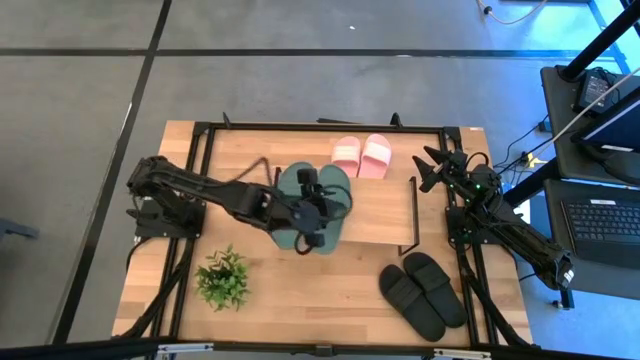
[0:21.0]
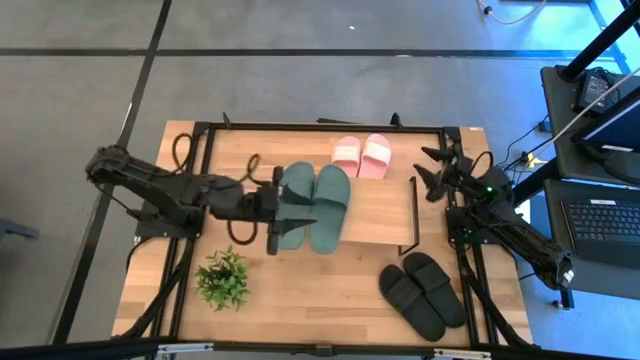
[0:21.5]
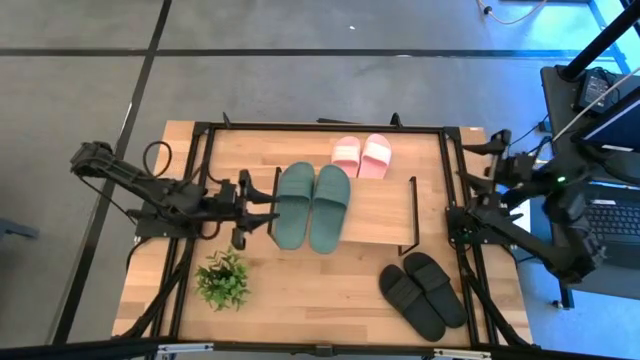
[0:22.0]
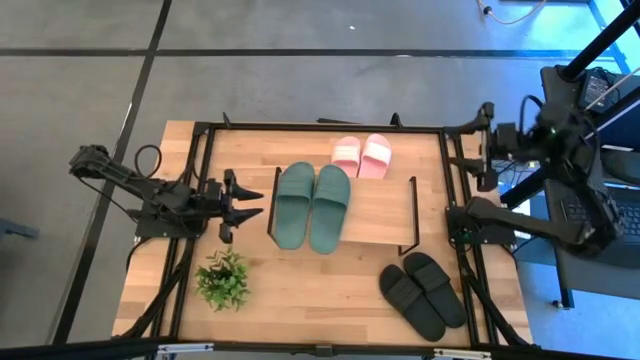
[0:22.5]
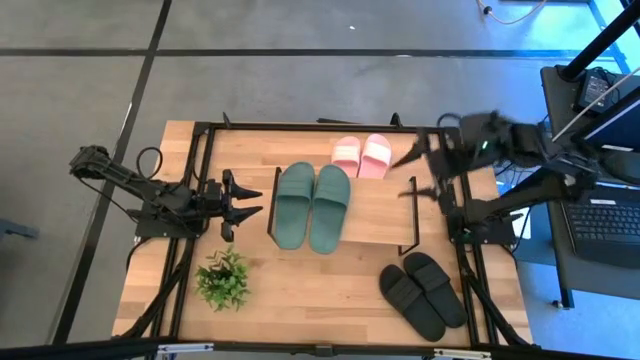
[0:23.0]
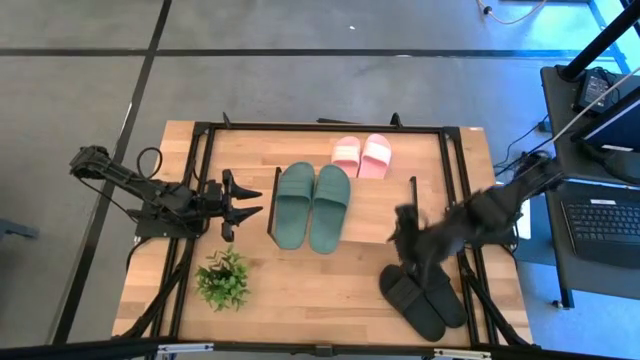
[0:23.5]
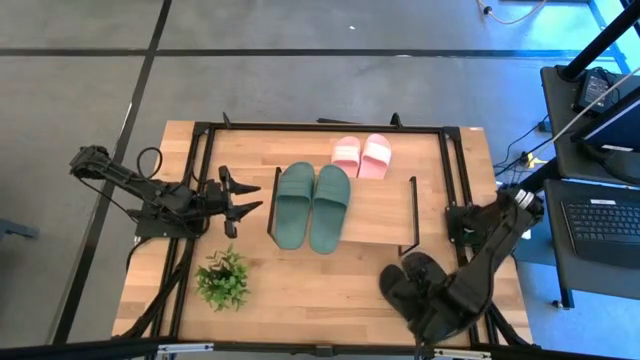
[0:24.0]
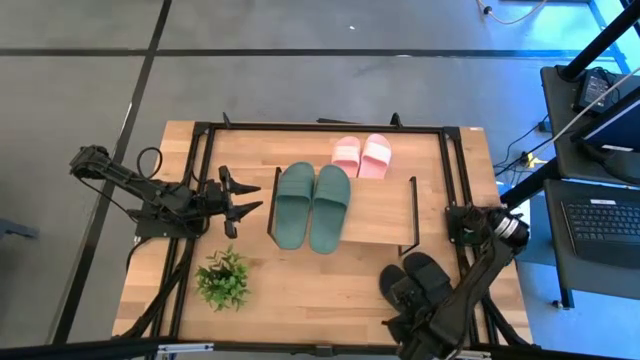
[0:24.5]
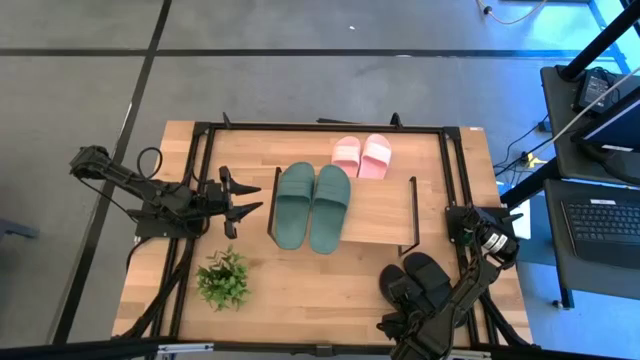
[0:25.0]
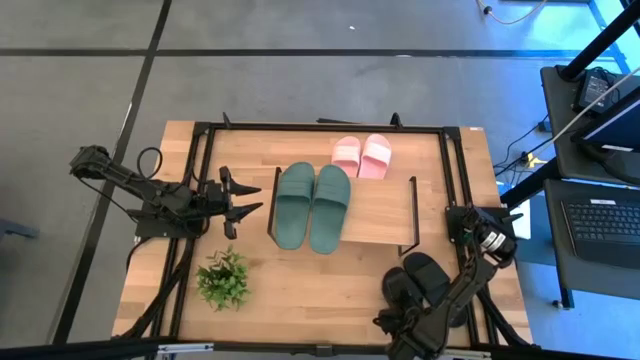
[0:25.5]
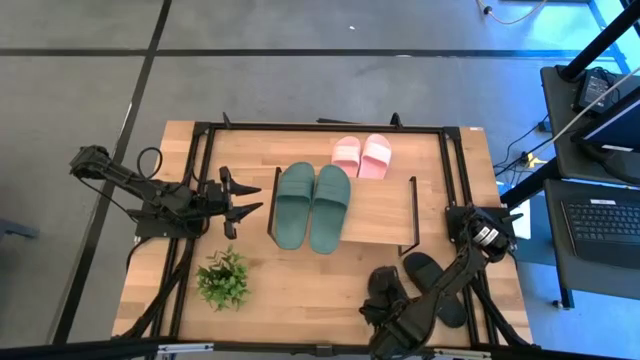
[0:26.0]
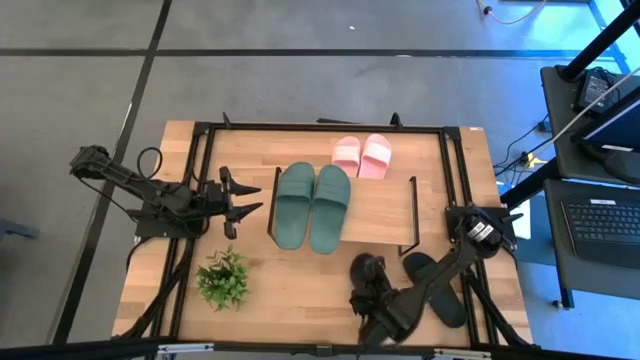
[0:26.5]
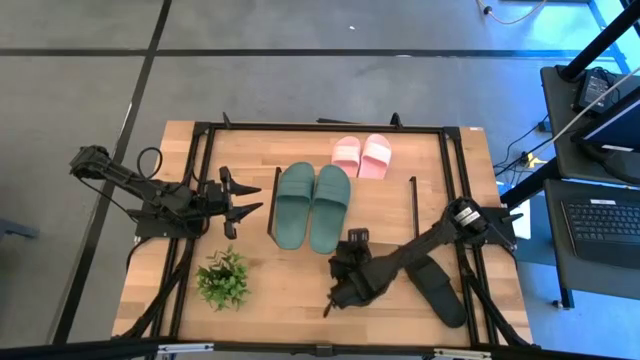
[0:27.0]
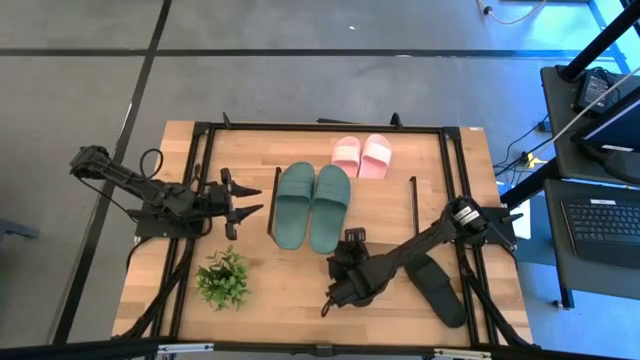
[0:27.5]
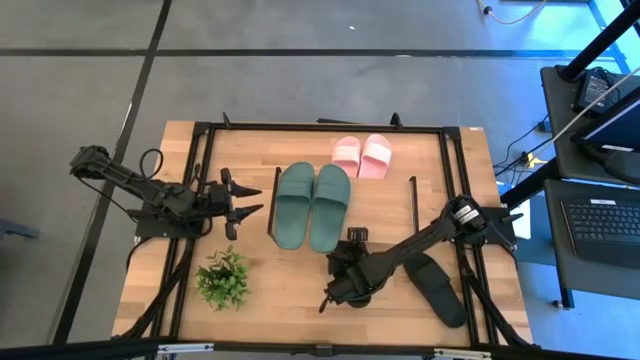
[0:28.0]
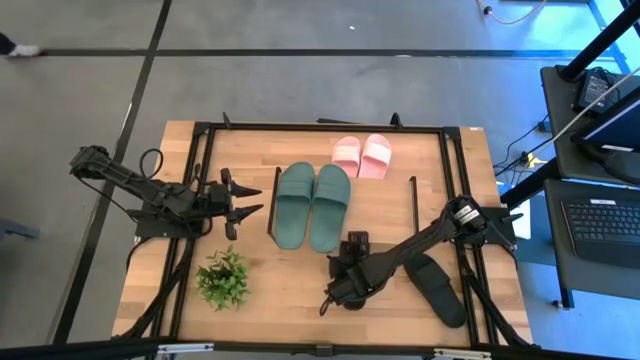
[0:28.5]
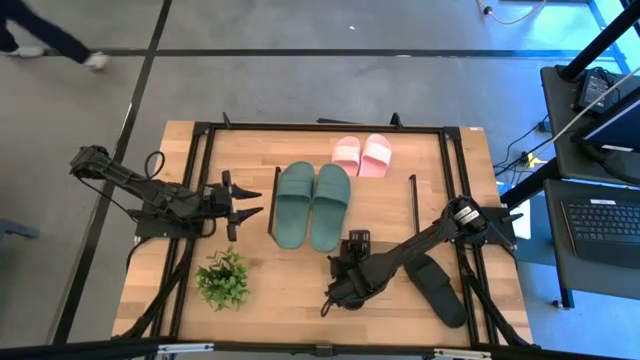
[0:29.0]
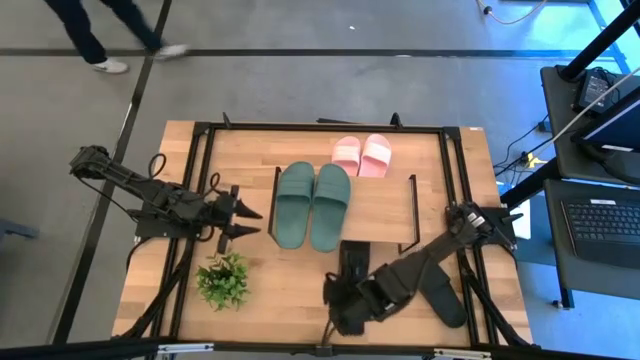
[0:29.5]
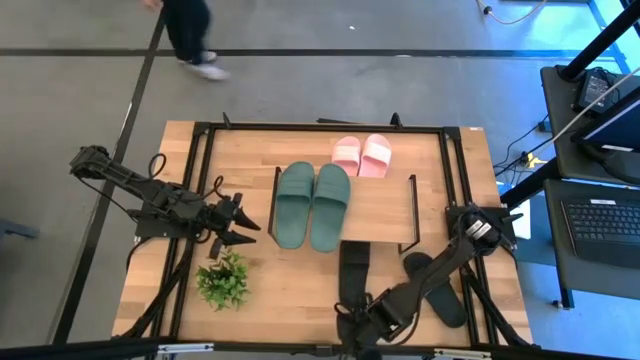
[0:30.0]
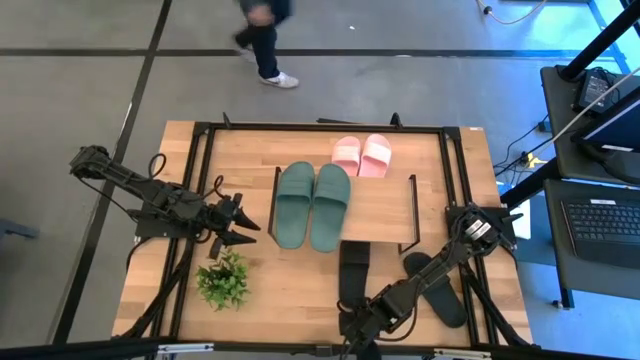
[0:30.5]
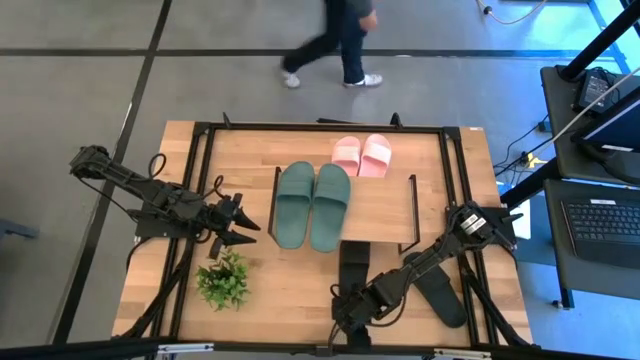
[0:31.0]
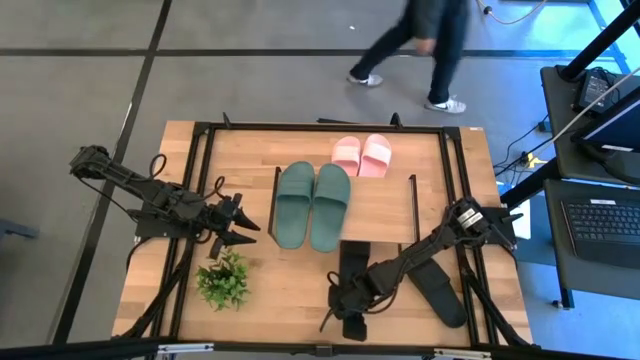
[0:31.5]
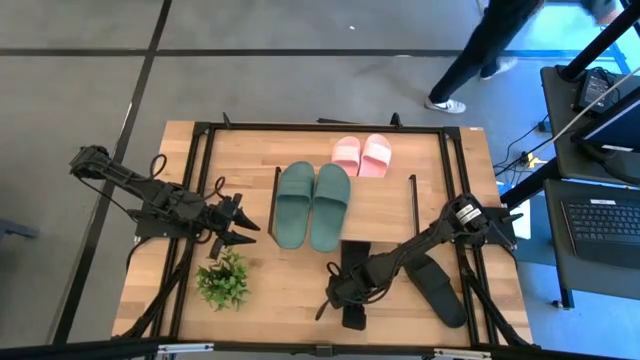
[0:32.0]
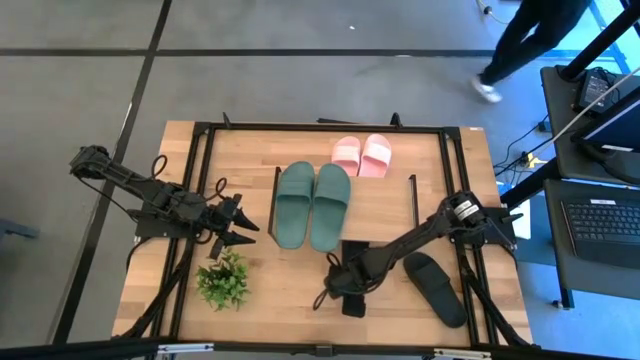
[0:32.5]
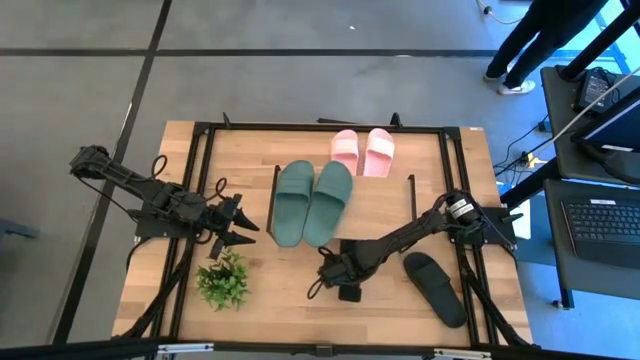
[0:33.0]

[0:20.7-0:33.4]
Task: Pick and place slides into the shelf
Put the left black slipper under the shelf

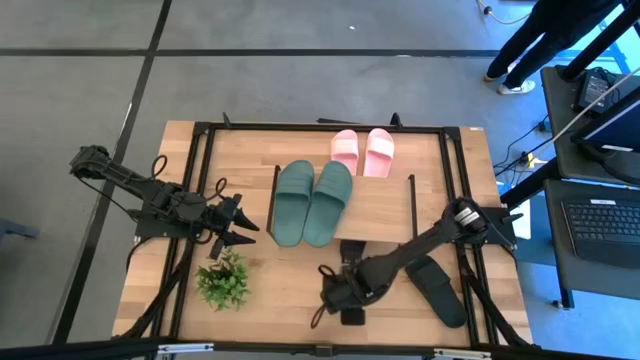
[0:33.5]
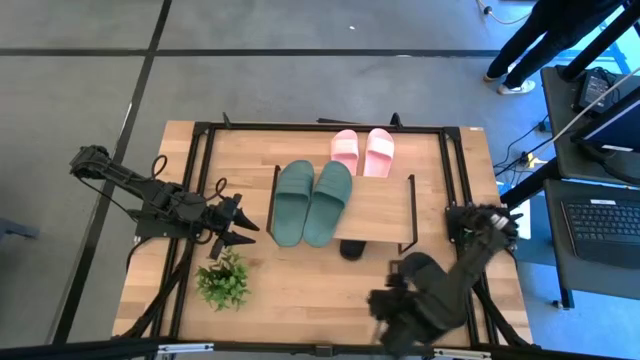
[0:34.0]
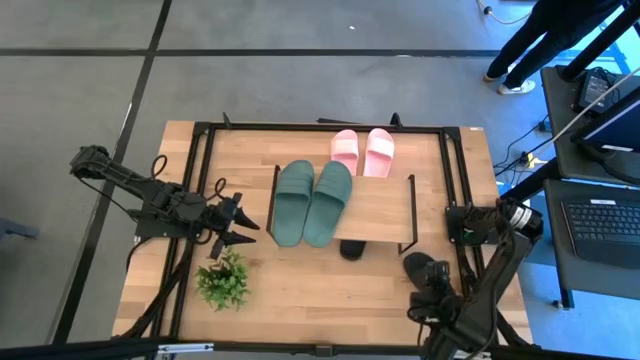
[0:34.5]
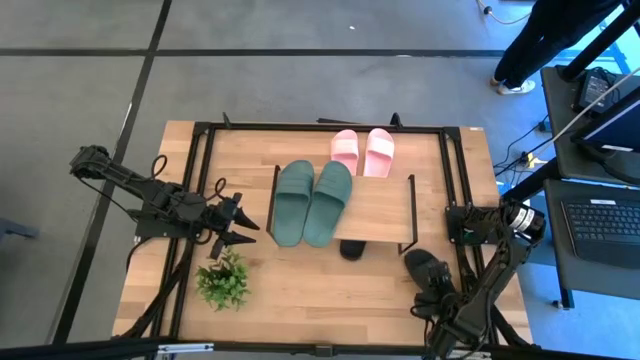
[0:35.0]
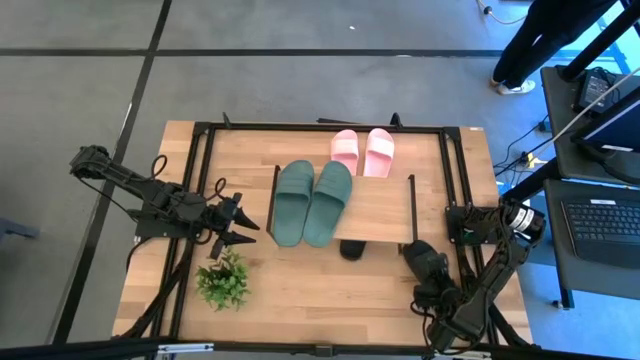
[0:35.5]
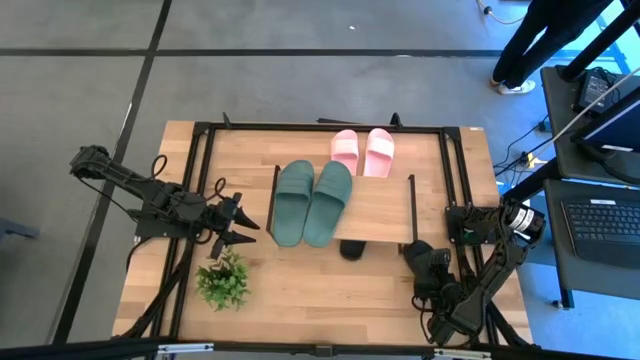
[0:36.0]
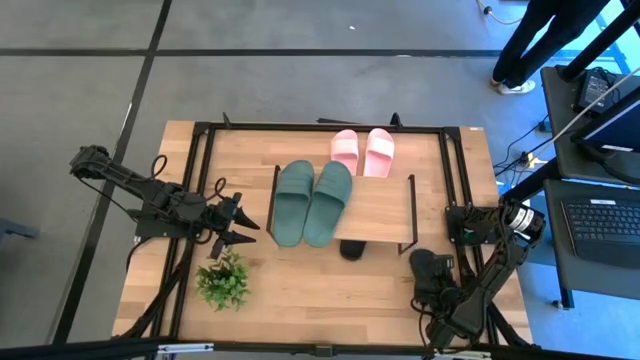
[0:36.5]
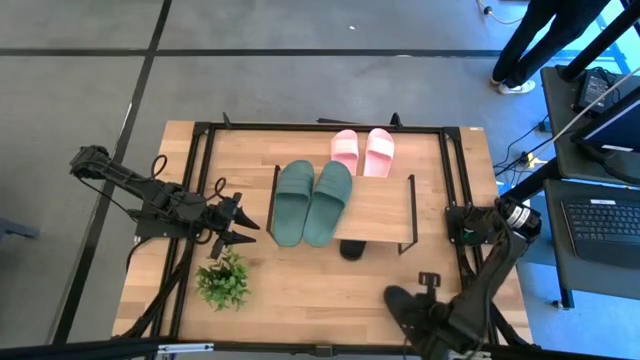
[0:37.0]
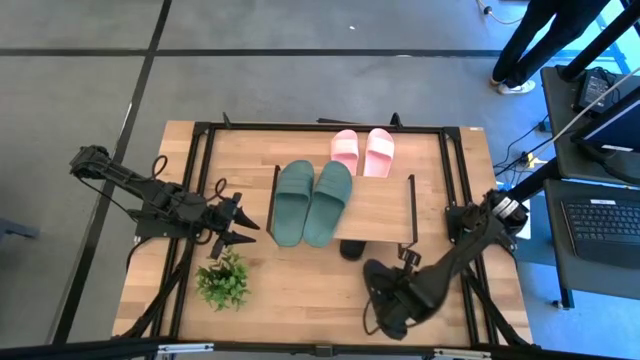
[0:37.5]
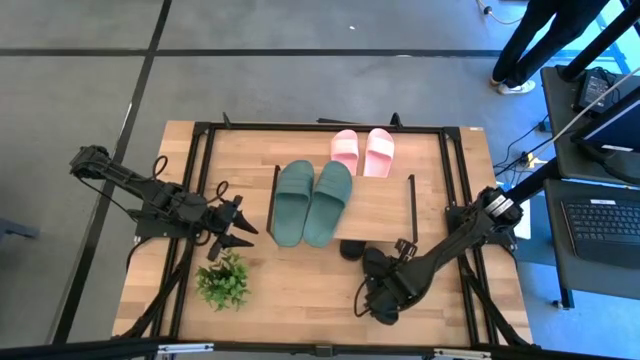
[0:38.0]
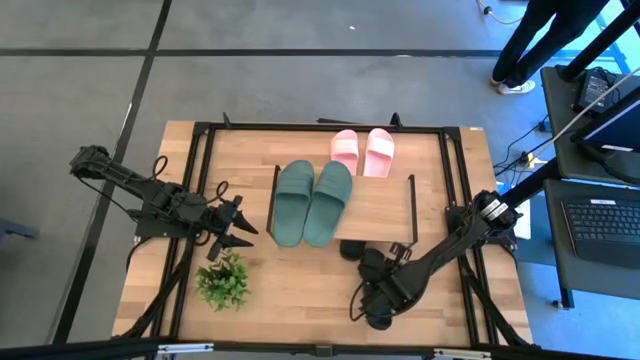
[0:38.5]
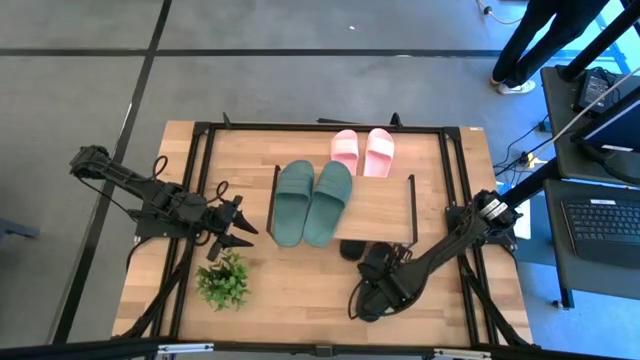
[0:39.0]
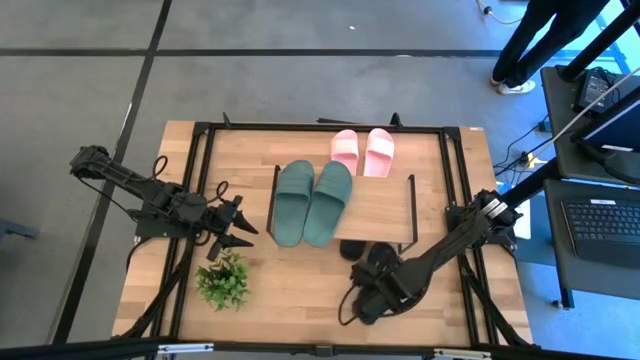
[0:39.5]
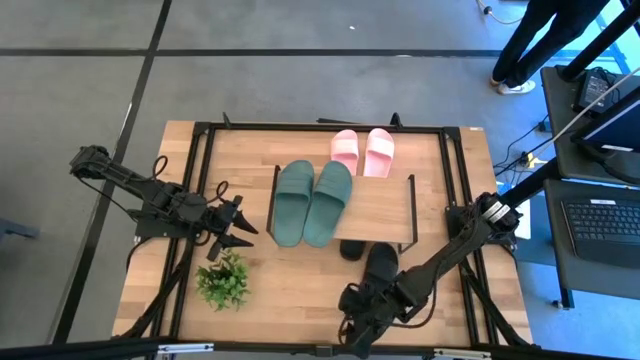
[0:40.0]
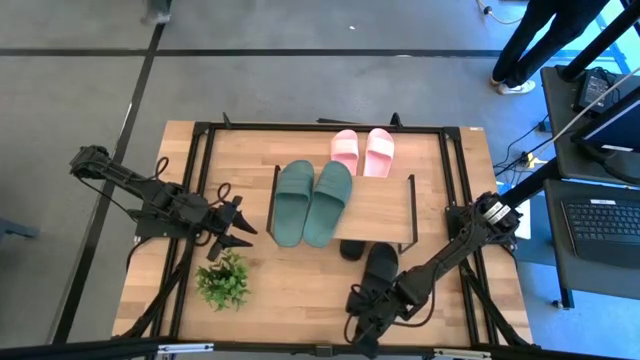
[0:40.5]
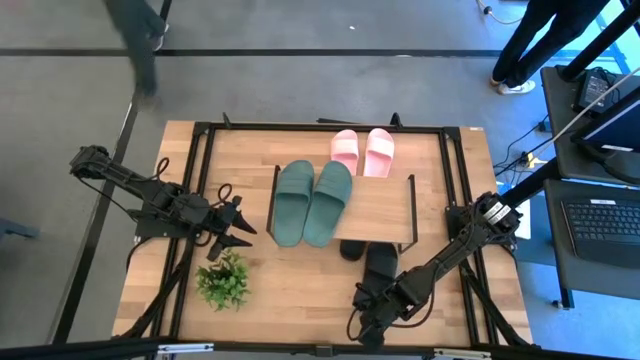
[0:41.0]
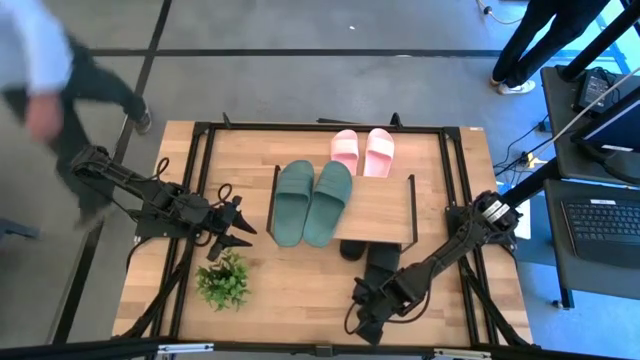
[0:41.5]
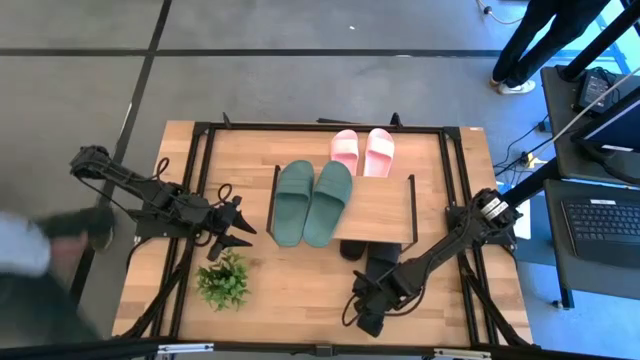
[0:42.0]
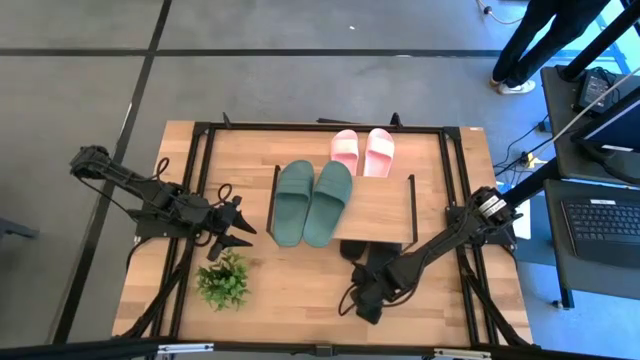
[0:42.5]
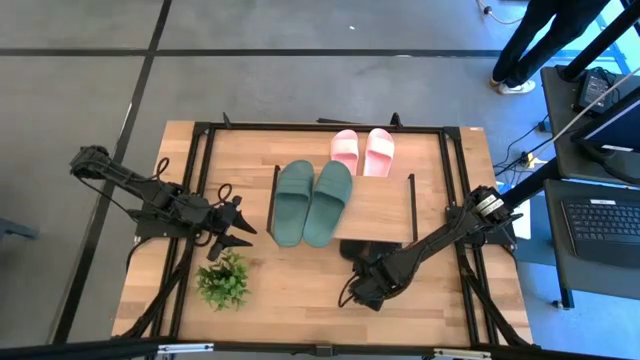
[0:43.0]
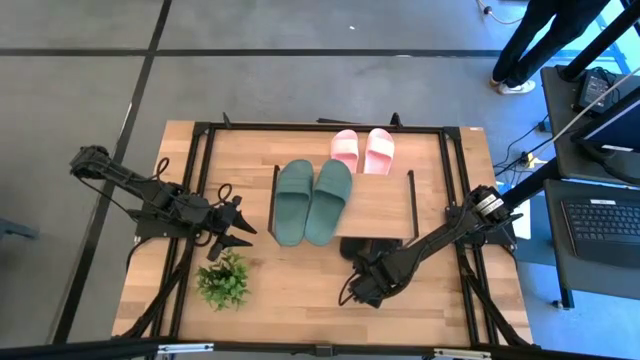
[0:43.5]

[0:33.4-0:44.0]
Put the right black slipper under the shelf
